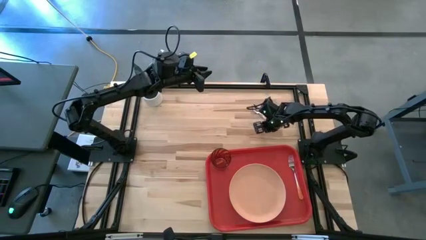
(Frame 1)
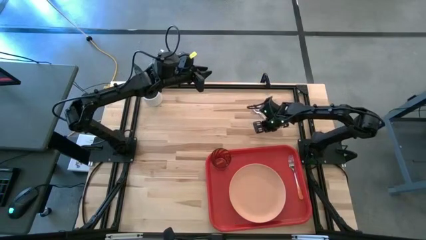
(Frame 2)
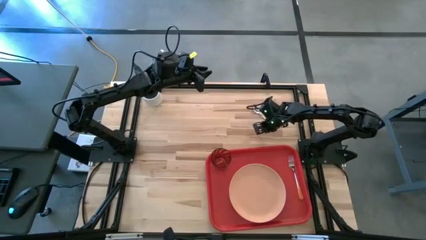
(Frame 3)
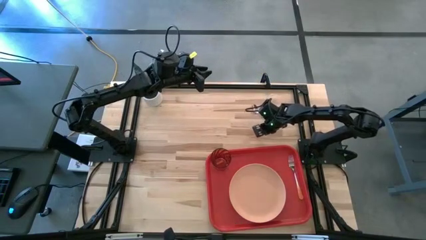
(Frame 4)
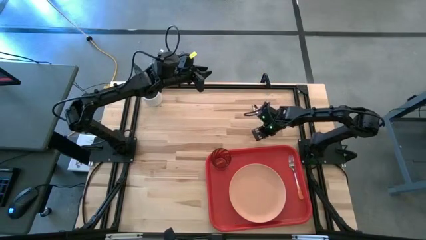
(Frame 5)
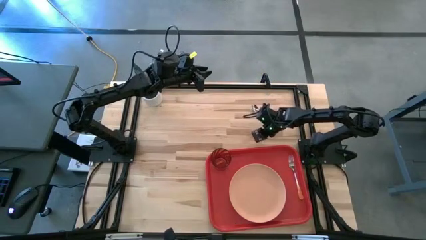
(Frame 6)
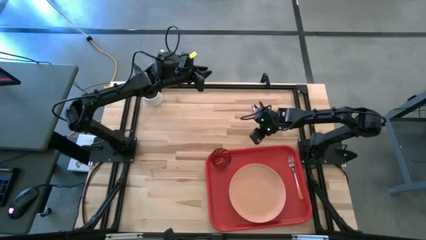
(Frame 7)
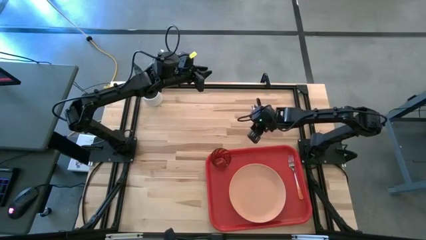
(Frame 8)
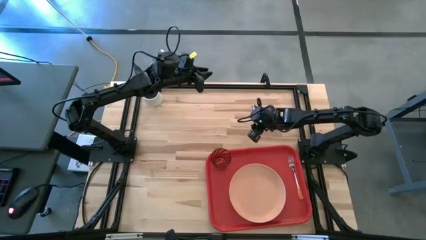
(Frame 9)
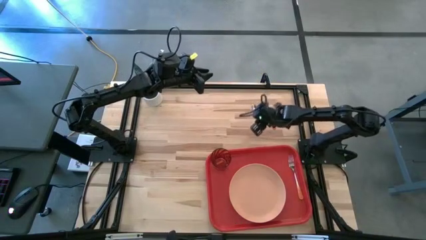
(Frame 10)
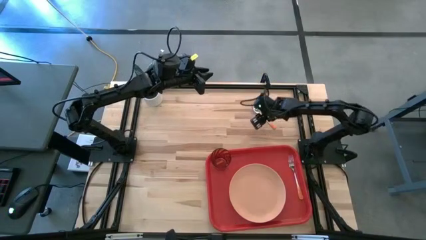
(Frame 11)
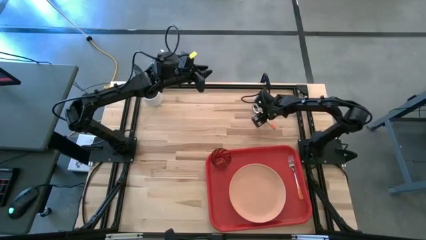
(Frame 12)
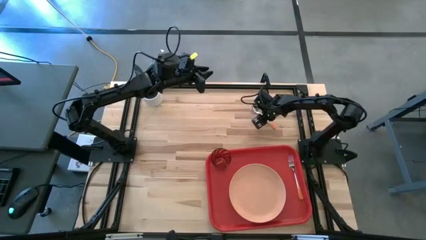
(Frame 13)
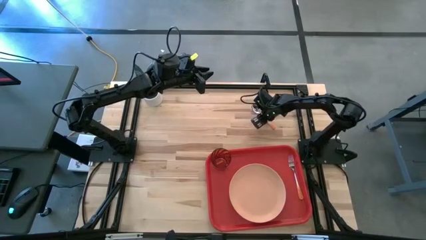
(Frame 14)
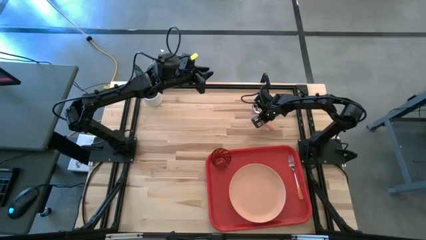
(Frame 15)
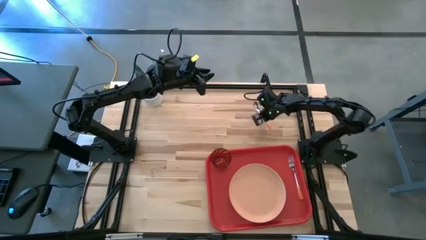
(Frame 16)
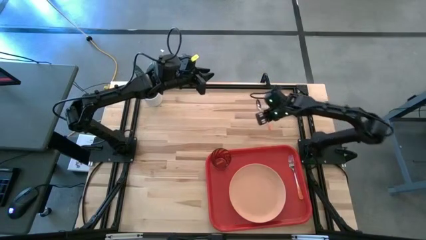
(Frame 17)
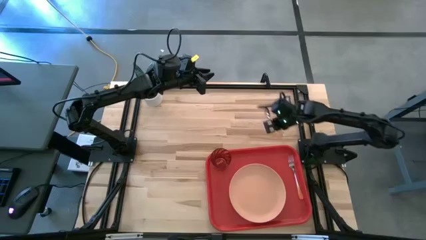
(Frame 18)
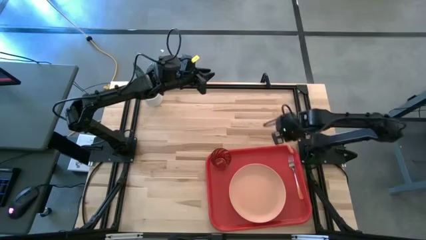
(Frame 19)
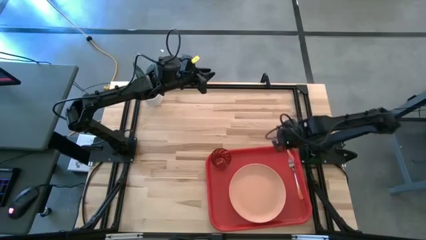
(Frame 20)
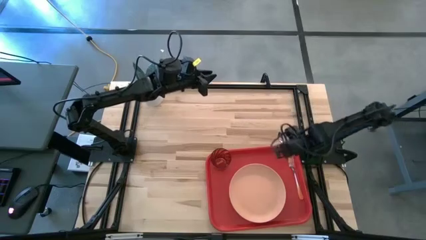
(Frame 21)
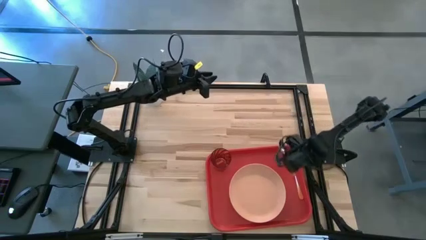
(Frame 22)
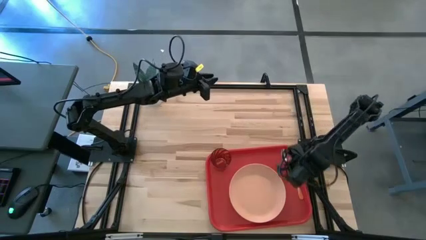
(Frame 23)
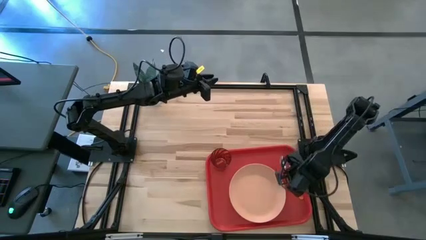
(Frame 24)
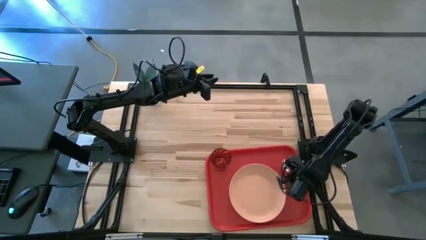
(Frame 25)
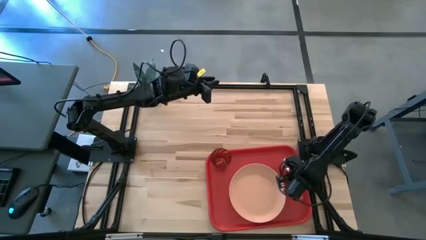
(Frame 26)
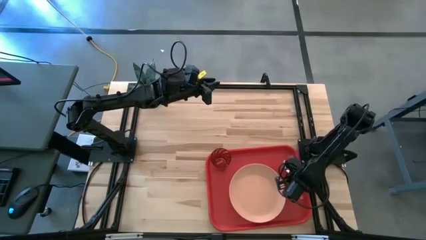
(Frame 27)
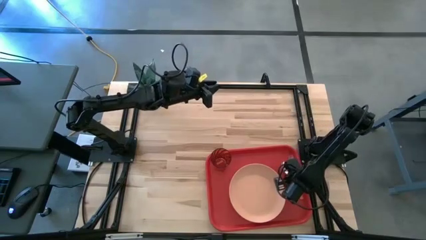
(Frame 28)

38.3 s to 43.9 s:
Task: Pick and place plate/cup/fork/spoon on tray
Put the orange spoon to the left of the orange fork on the red tray

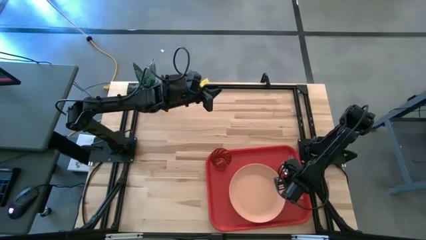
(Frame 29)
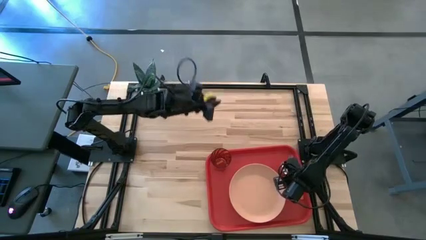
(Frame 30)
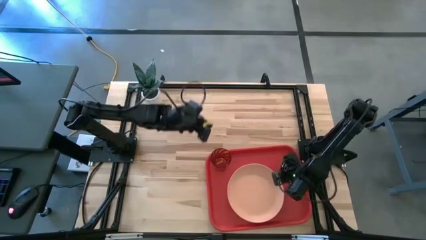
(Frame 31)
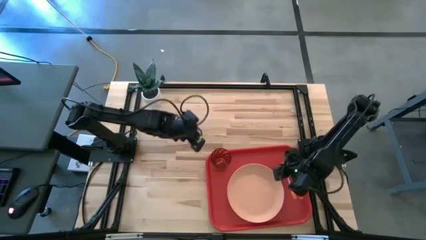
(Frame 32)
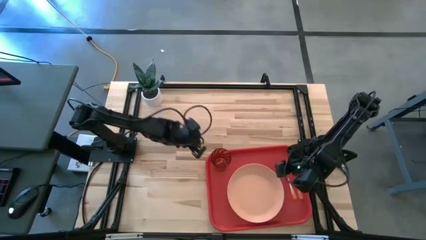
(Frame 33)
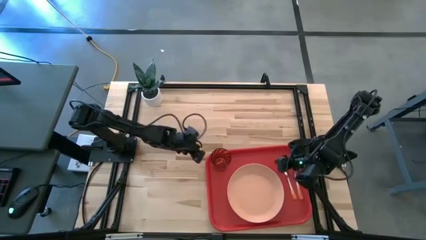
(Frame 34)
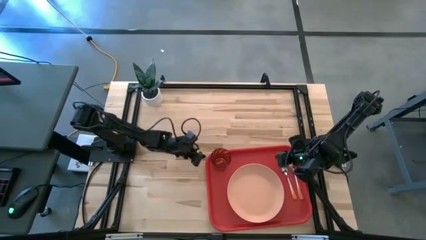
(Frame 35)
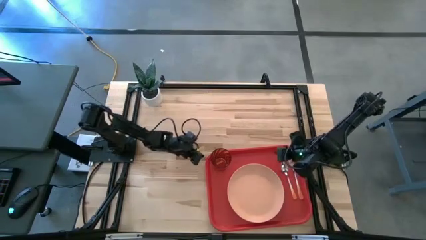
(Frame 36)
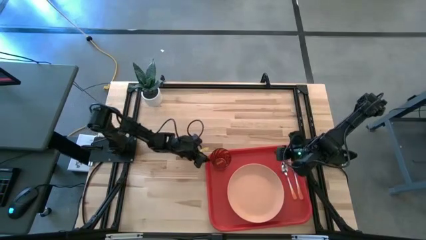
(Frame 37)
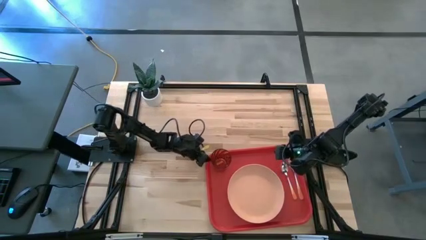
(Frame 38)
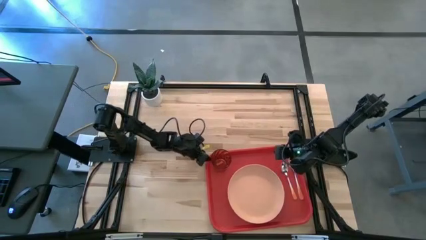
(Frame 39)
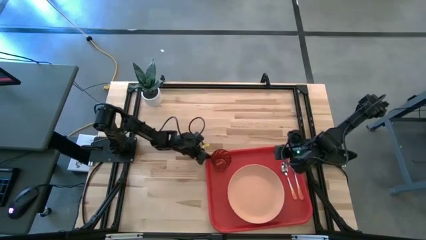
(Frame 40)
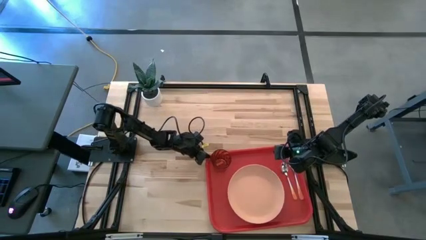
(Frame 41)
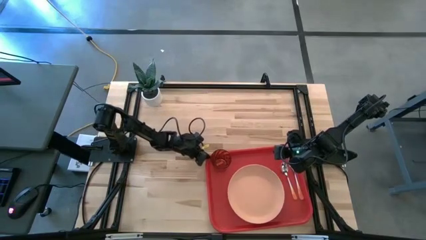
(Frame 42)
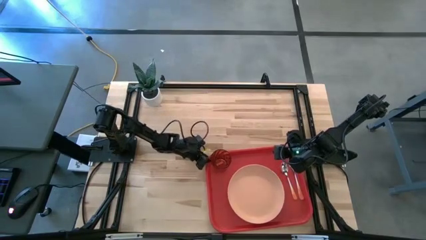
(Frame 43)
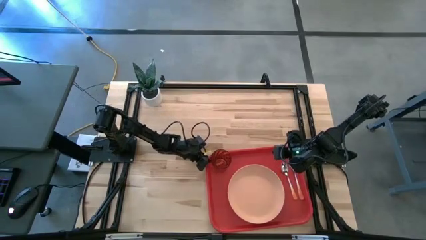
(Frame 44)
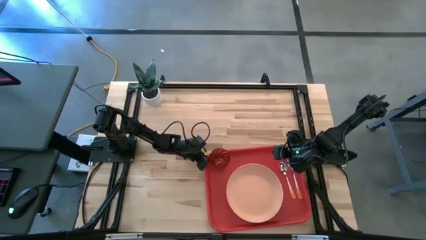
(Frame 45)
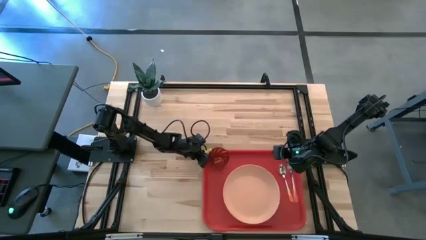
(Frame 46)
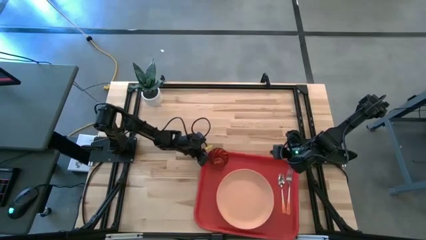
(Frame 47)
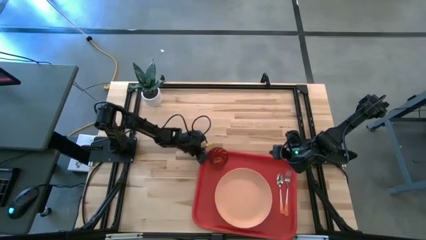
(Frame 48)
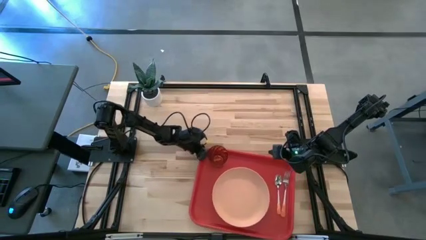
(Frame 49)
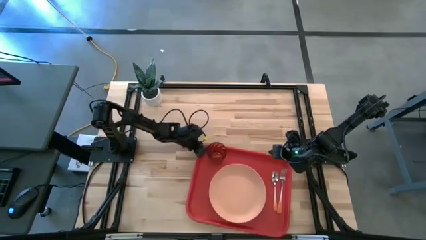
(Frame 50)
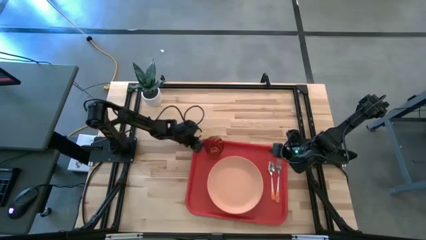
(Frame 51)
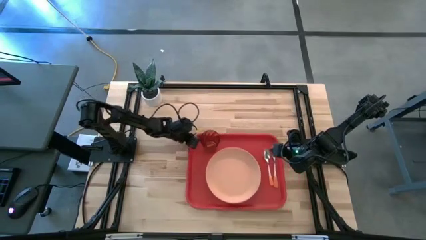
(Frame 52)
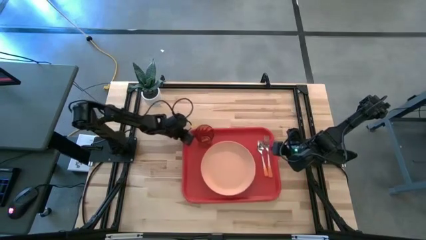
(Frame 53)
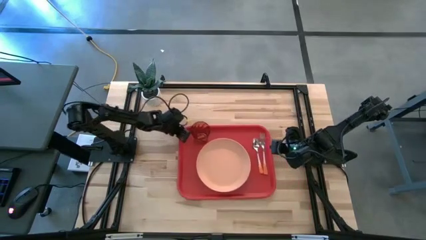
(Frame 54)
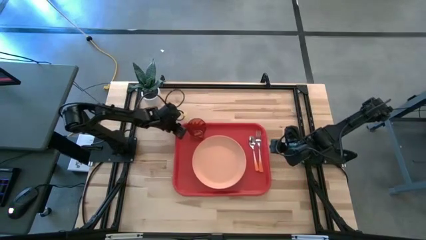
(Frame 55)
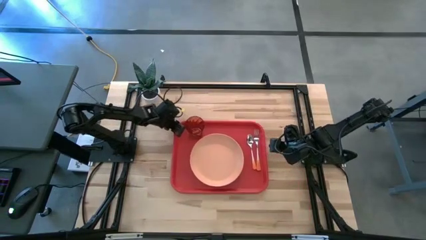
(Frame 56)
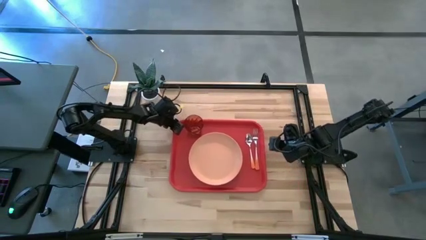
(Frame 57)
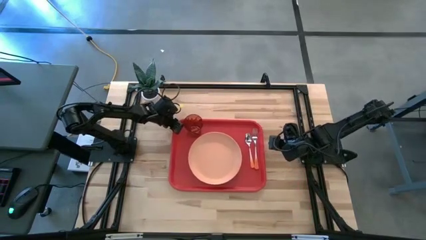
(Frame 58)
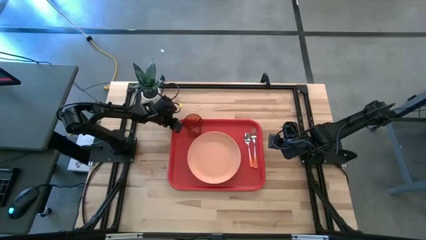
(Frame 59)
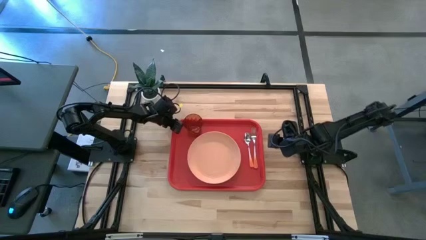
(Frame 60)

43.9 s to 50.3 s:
Move the red tray to the center on the table
